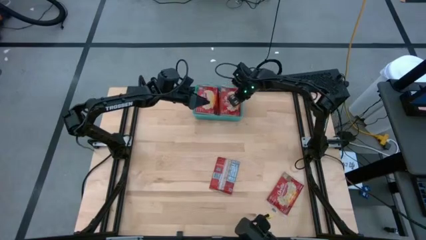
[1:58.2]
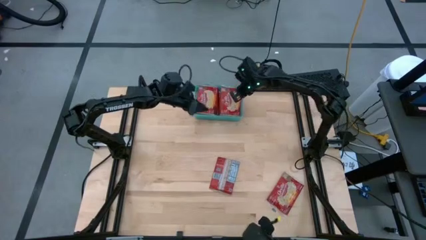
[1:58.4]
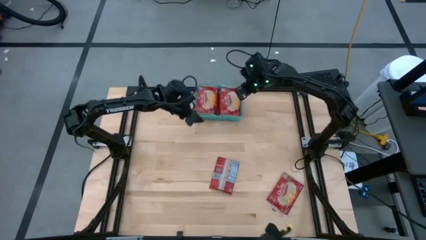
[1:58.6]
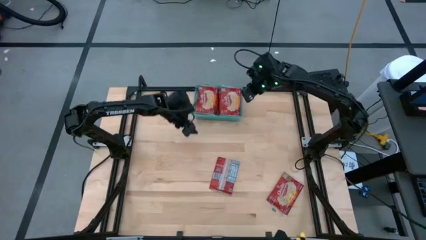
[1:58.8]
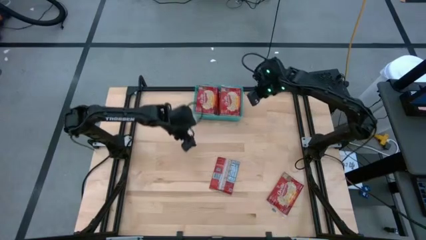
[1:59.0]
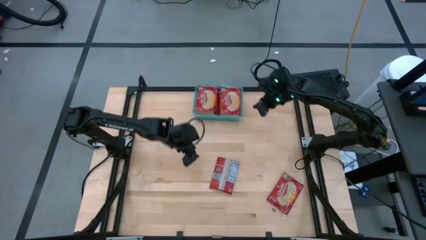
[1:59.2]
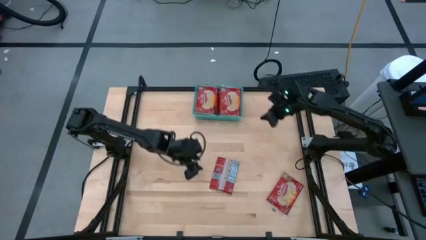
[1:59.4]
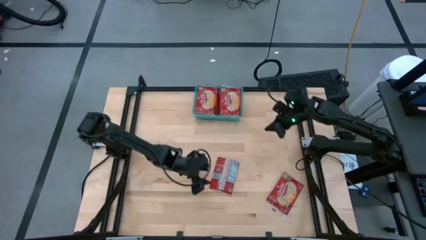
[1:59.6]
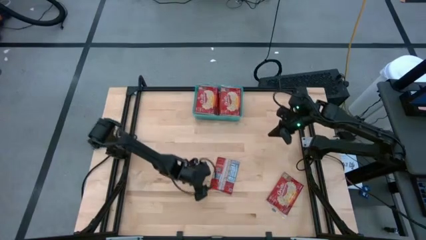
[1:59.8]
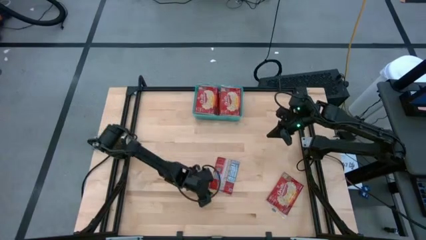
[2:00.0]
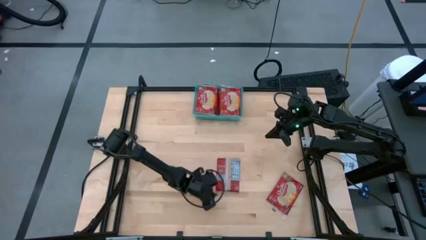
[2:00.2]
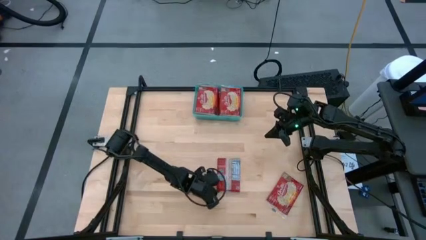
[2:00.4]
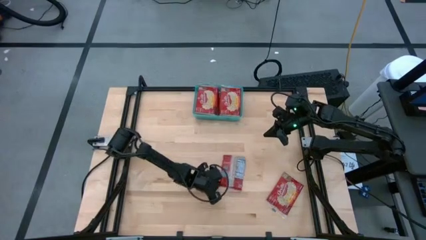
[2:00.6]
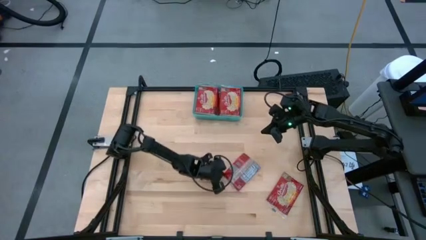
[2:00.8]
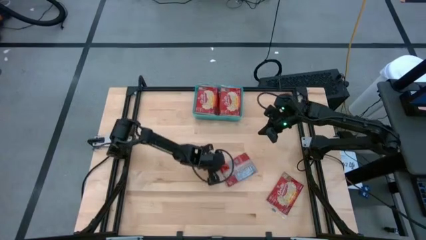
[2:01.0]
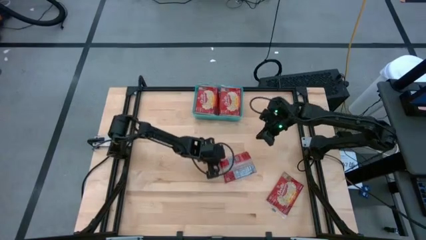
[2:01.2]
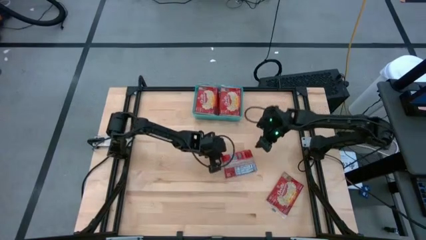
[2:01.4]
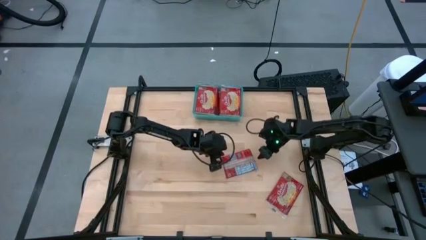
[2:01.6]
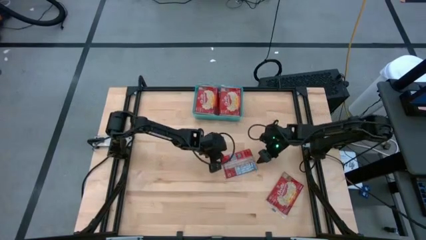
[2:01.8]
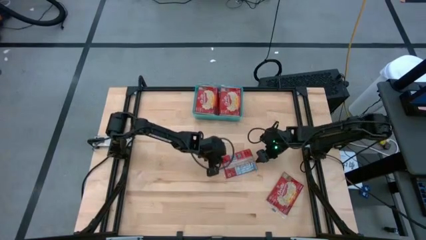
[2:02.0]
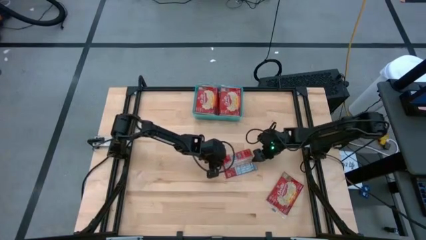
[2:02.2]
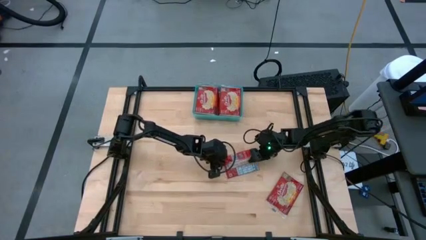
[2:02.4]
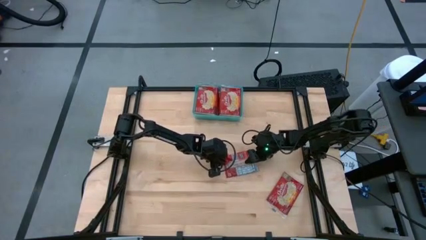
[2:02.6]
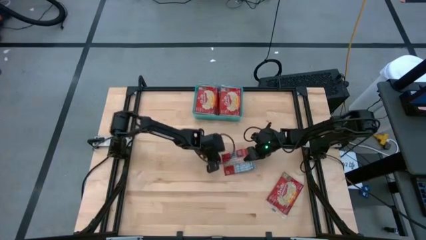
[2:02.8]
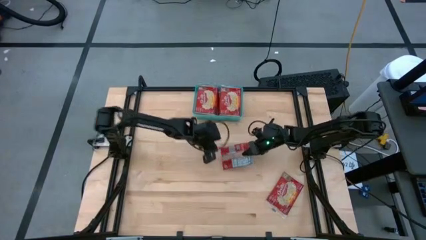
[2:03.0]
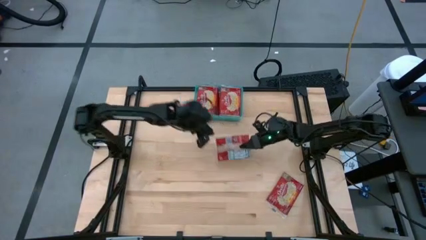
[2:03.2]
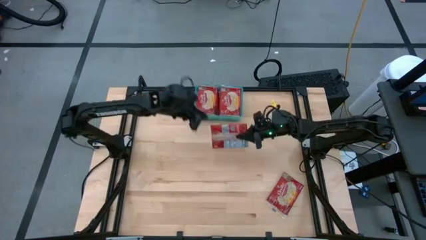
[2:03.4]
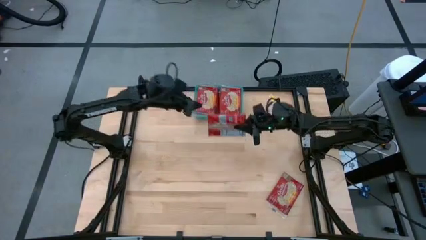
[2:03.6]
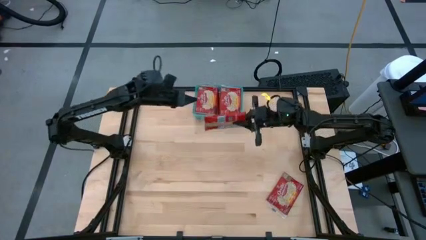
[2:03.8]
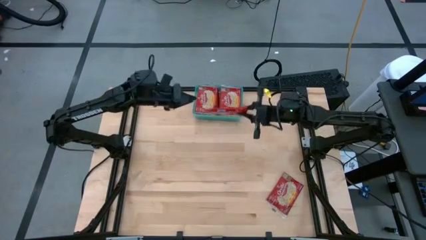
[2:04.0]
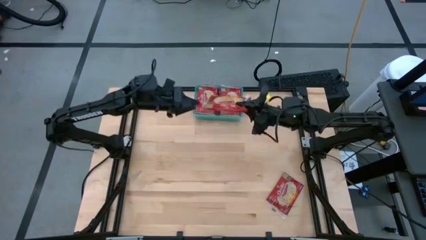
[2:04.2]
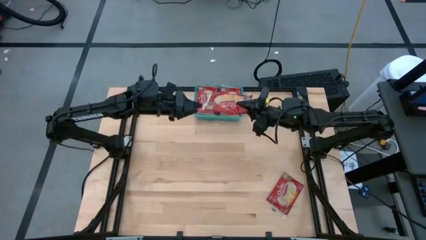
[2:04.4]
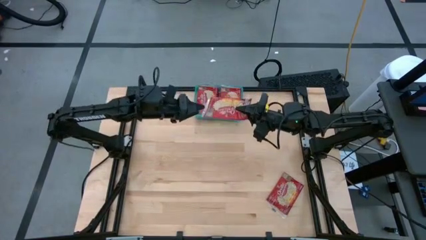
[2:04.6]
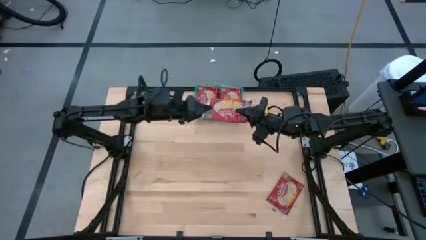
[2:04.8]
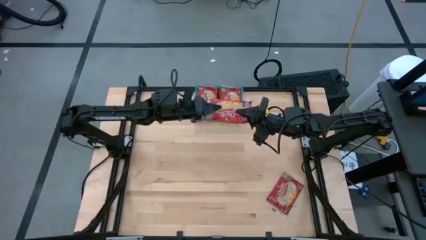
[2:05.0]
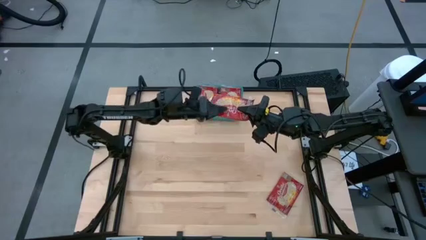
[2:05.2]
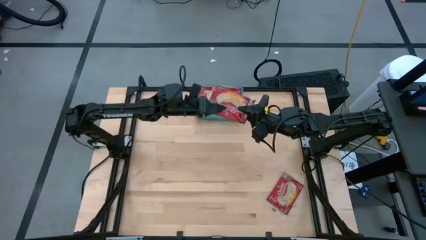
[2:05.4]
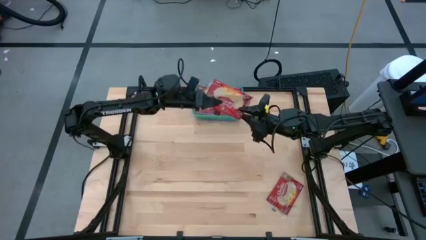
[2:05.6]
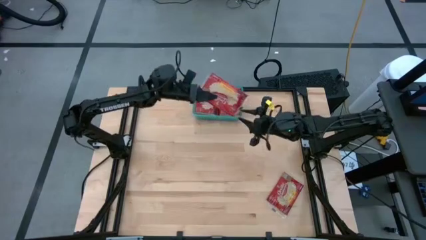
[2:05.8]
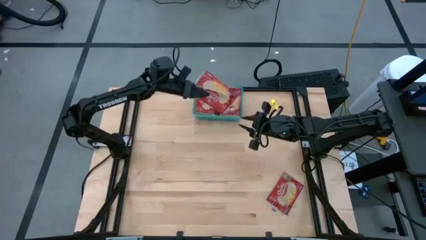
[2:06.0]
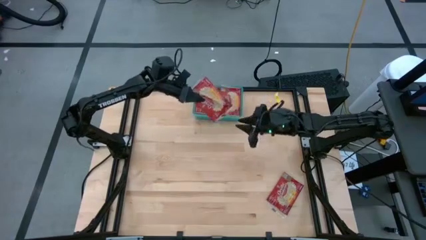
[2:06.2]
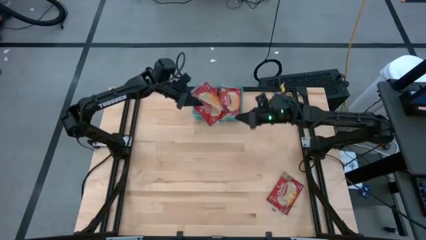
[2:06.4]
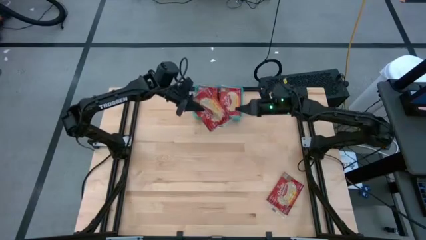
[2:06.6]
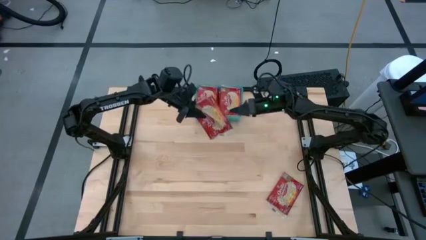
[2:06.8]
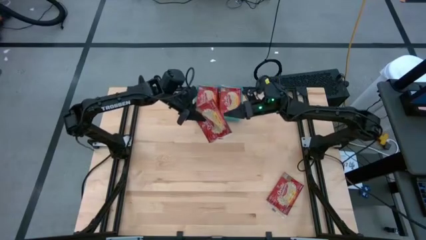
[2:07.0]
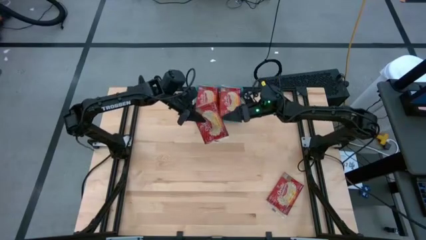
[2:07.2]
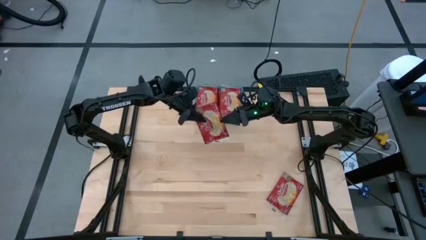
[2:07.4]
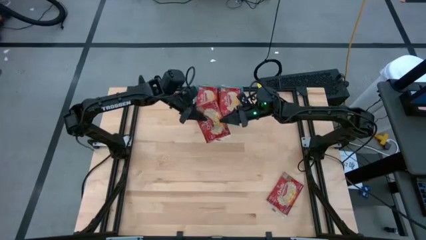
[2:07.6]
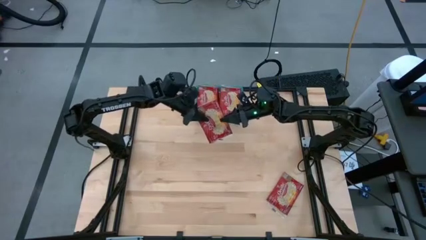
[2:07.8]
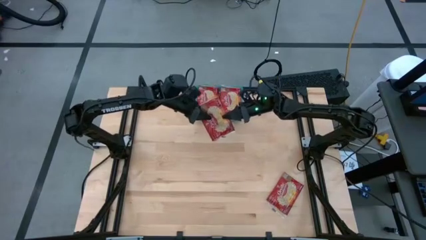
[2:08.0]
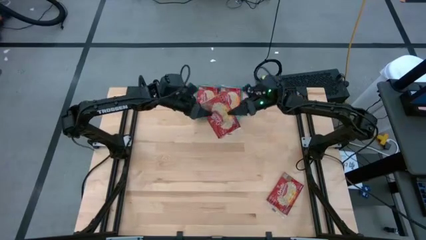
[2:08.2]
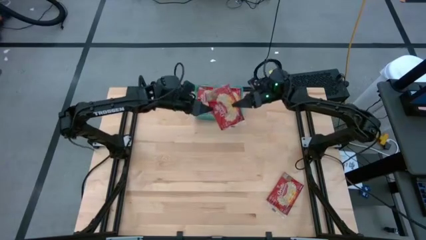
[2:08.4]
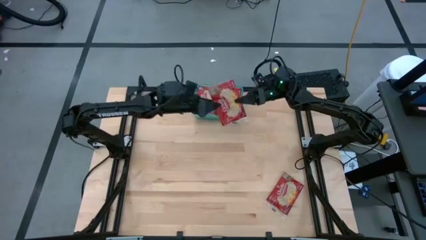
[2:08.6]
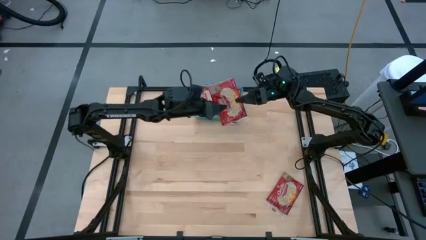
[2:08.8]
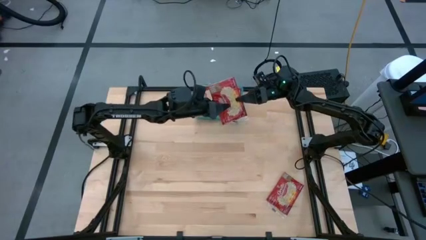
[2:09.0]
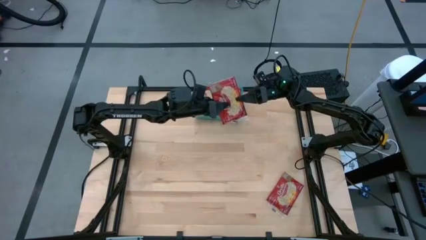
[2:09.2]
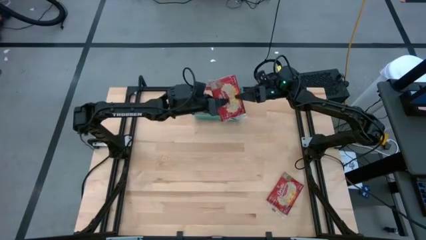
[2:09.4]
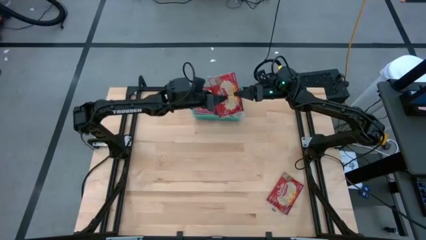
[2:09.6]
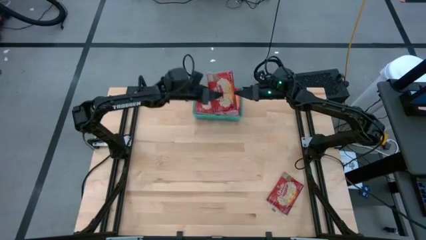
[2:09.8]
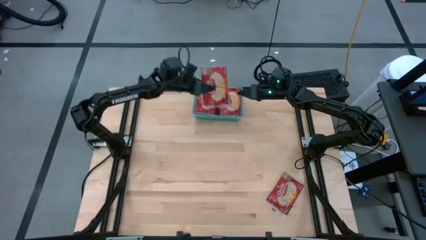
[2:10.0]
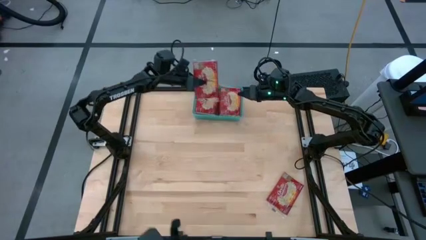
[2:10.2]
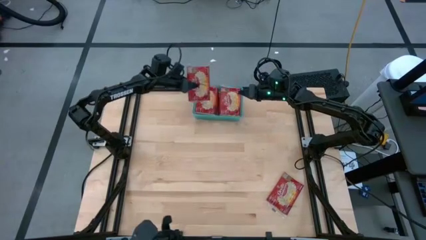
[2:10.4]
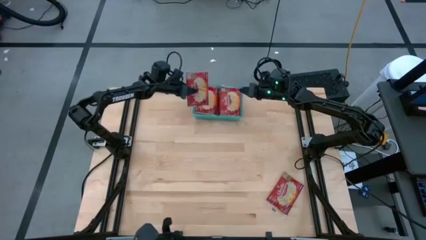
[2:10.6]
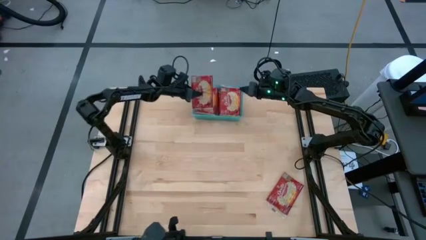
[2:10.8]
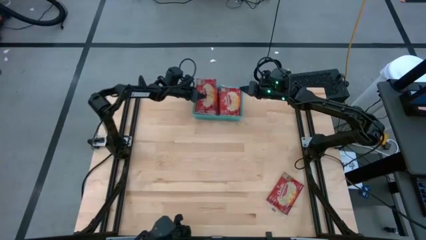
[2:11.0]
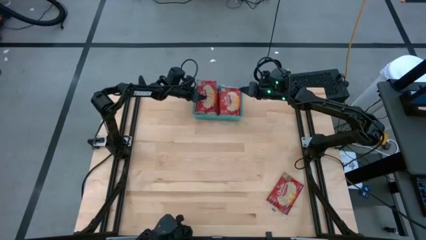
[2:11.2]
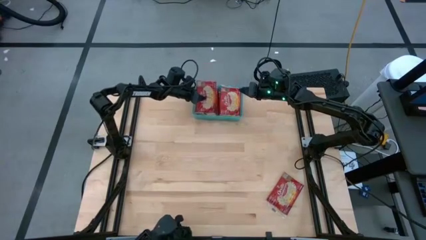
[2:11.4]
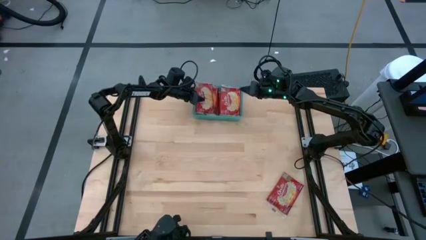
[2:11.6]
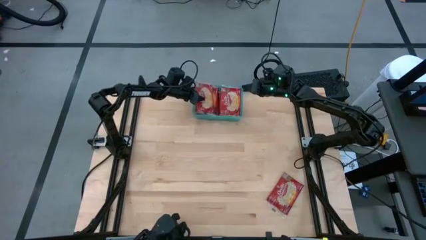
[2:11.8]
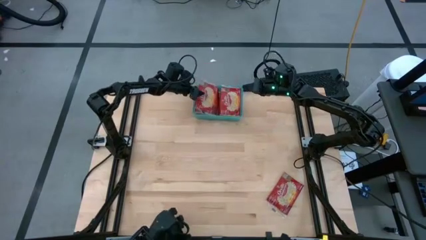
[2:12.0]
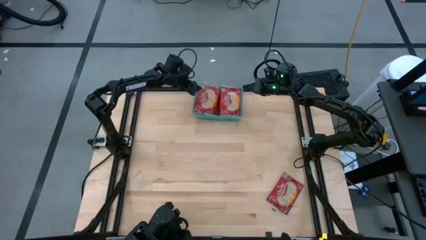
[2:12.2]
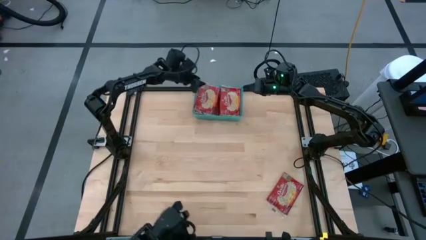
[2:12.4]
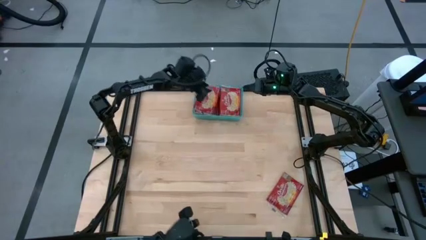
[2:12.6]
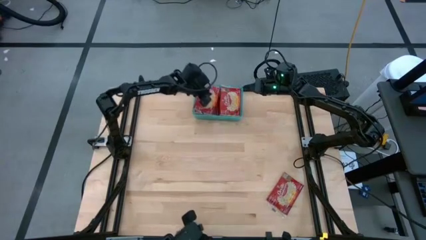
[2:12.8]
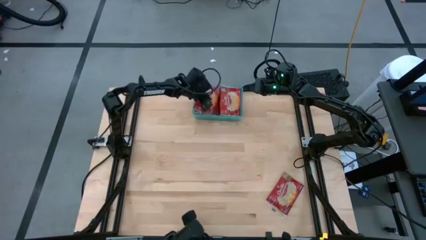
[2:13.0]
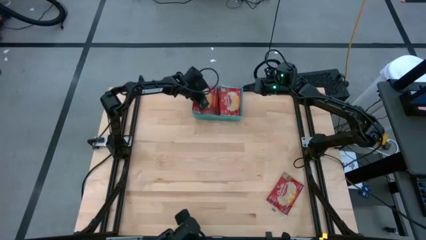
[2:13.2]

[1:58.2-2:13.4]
Task: Sort popcorn bags into baskets
Put the red popcorn bag into the blue bin
